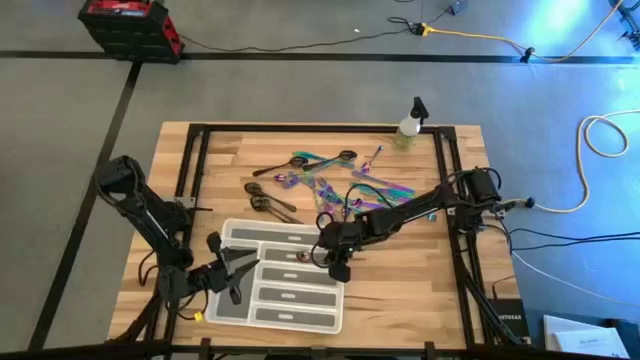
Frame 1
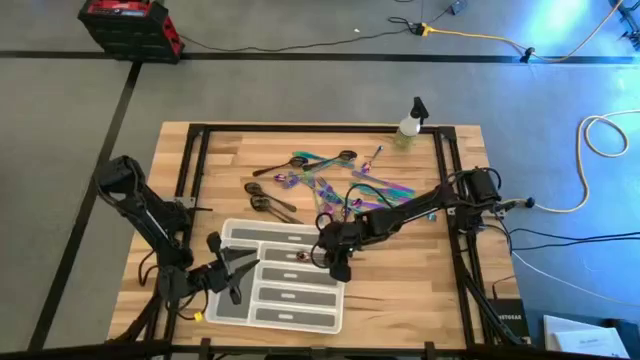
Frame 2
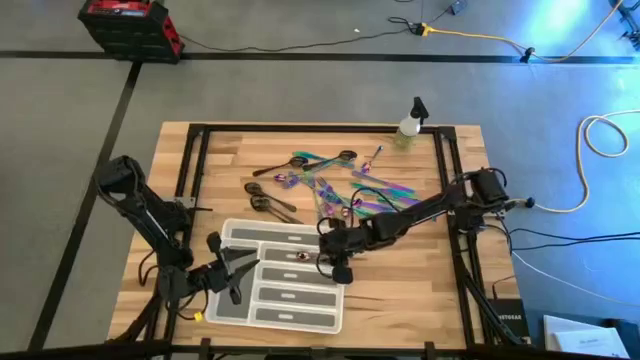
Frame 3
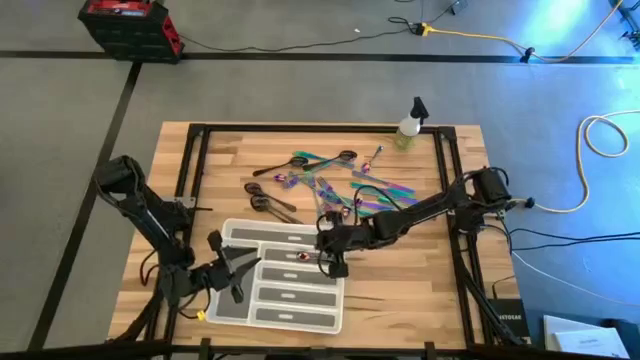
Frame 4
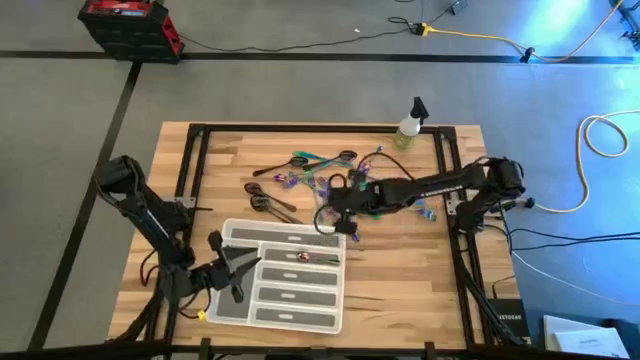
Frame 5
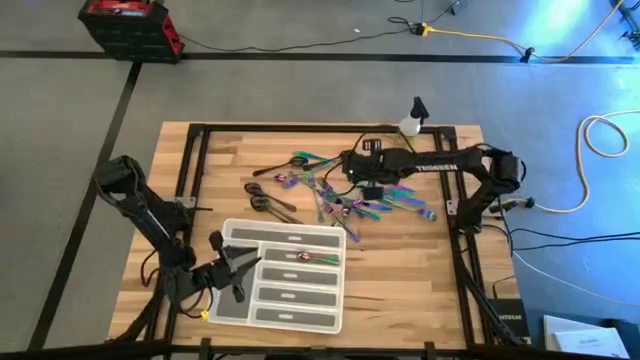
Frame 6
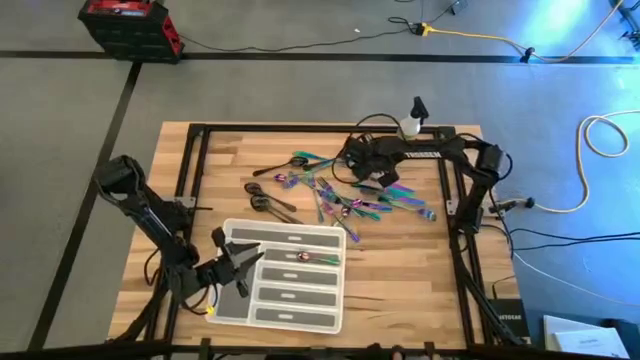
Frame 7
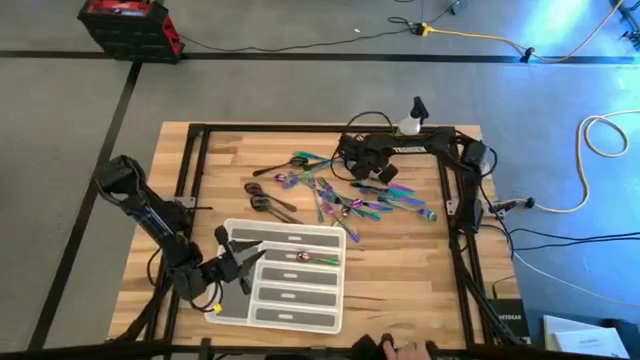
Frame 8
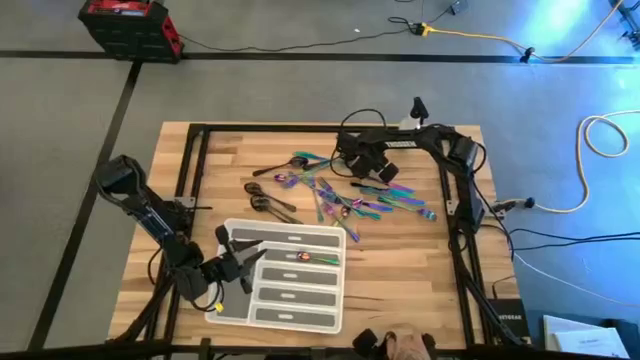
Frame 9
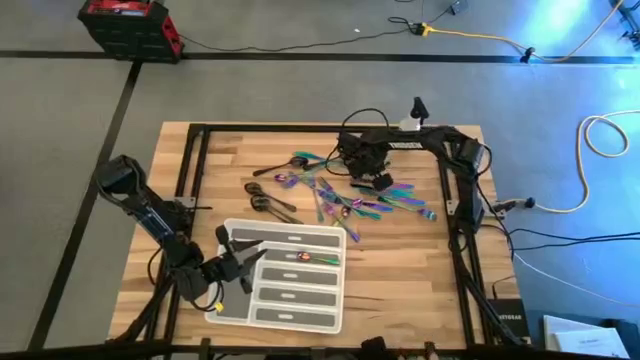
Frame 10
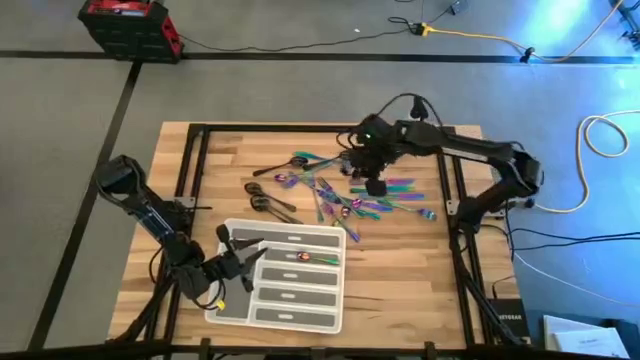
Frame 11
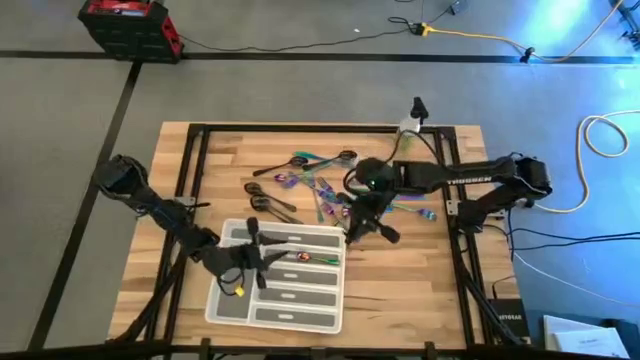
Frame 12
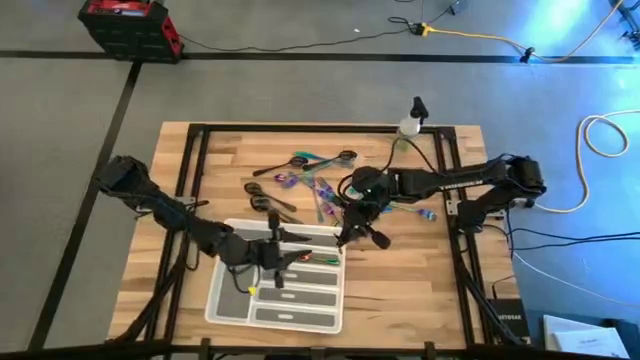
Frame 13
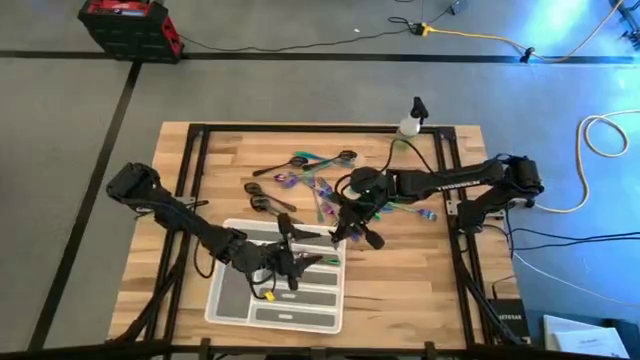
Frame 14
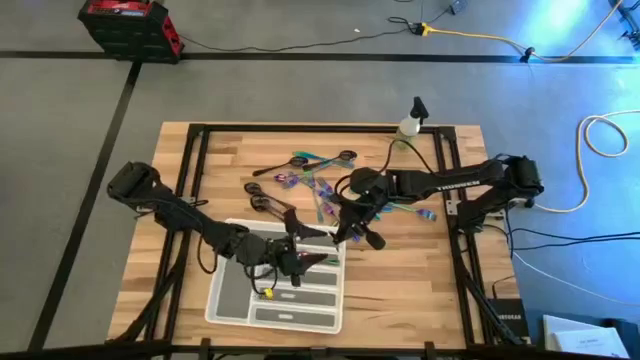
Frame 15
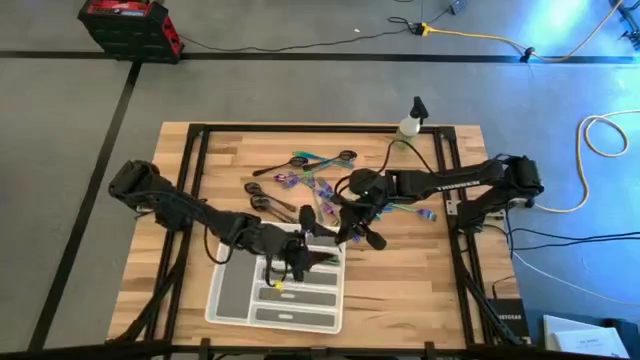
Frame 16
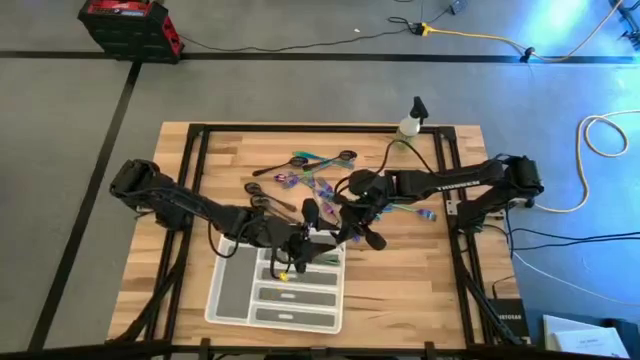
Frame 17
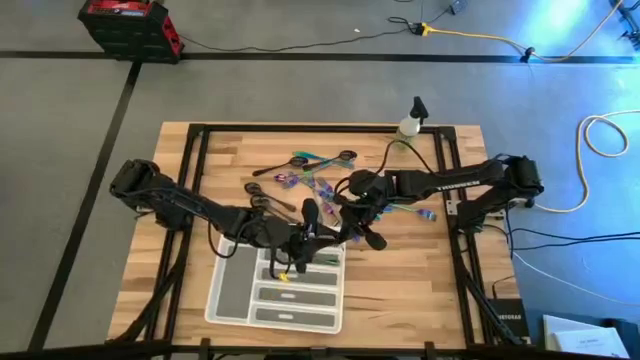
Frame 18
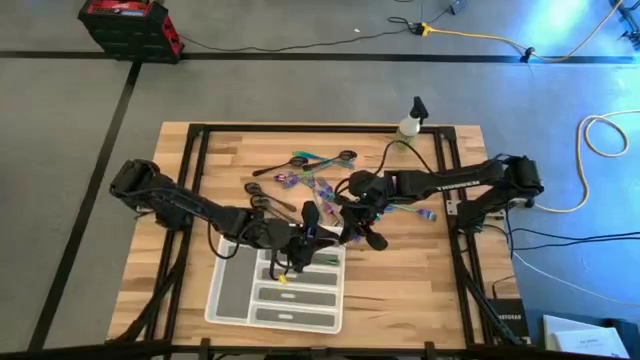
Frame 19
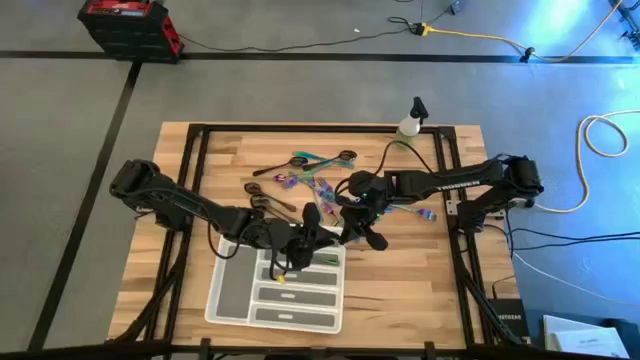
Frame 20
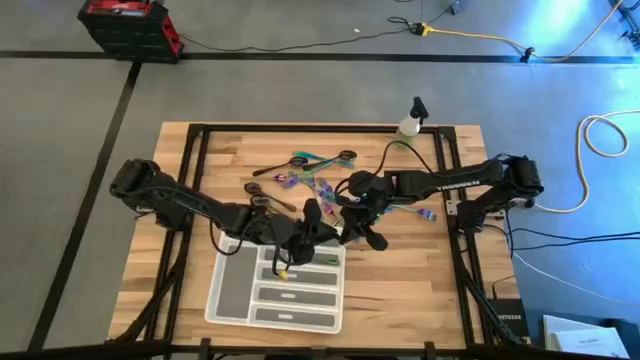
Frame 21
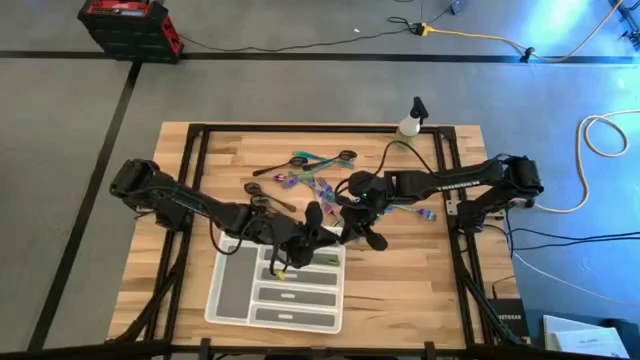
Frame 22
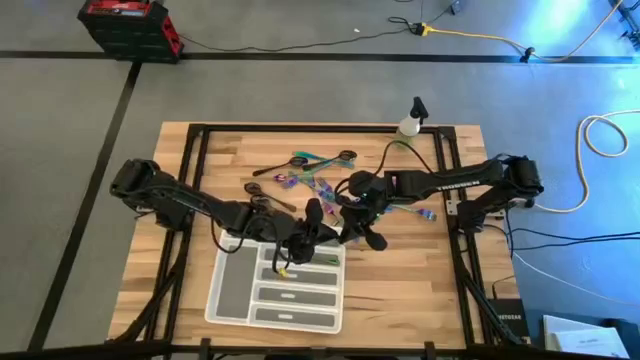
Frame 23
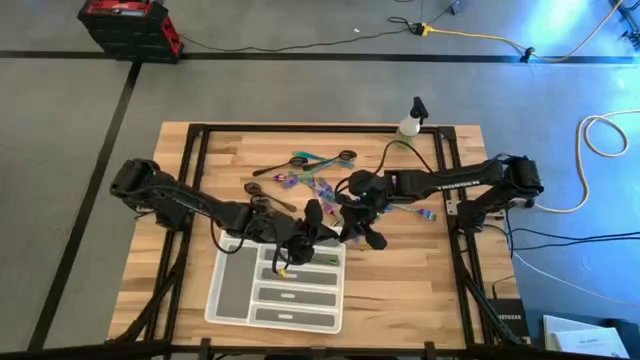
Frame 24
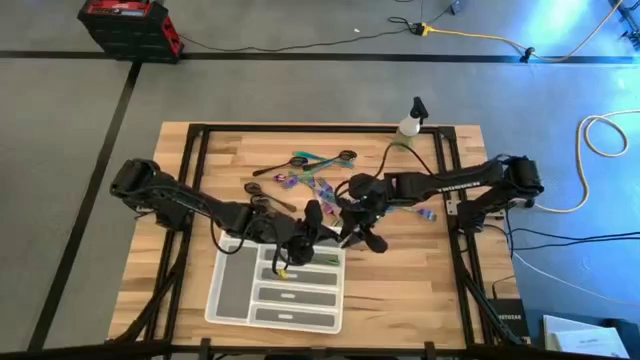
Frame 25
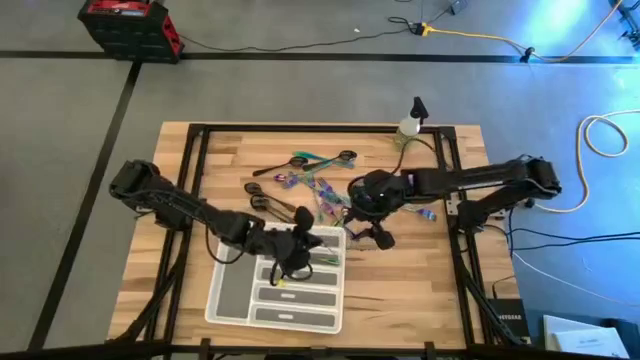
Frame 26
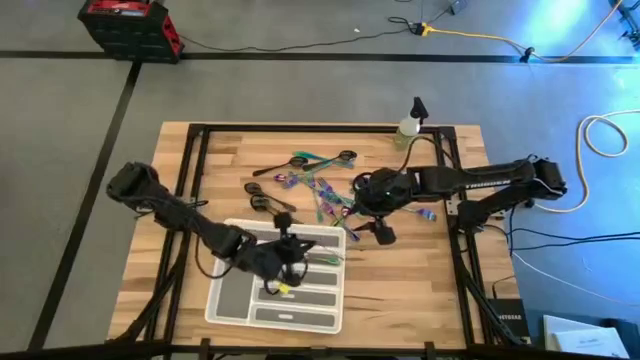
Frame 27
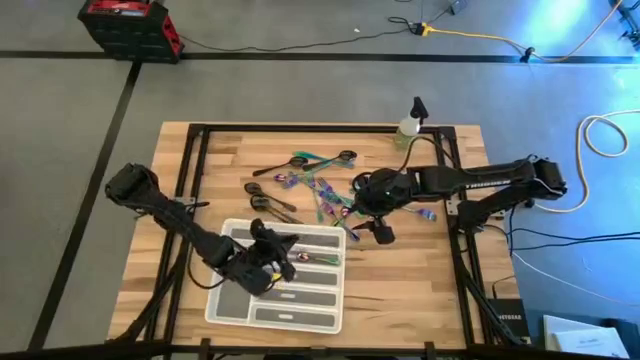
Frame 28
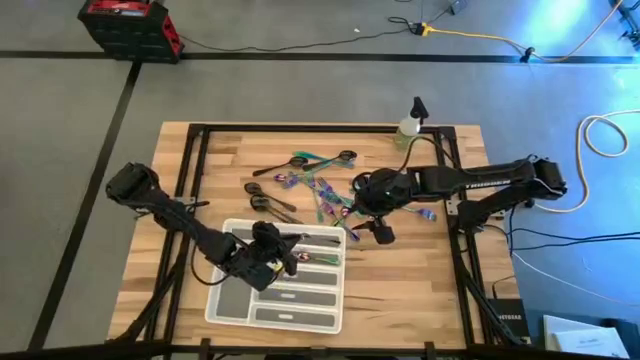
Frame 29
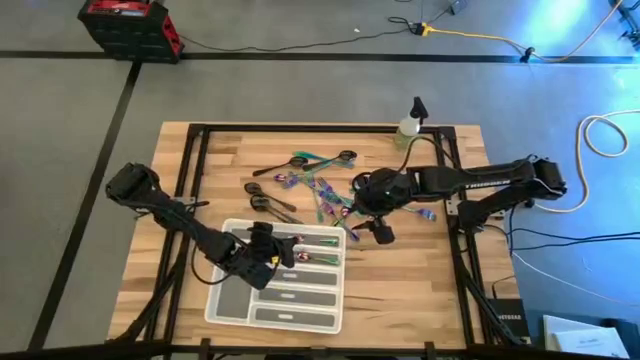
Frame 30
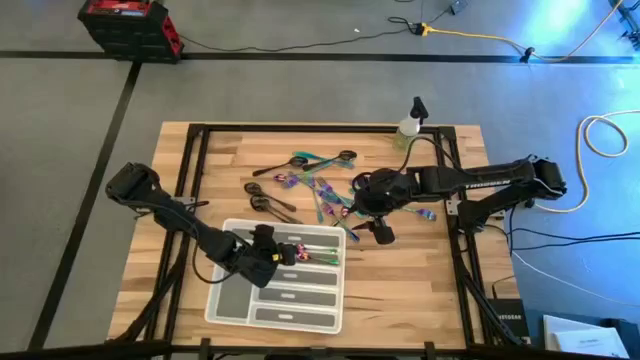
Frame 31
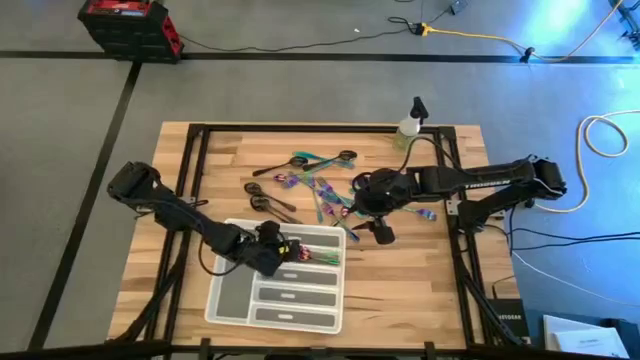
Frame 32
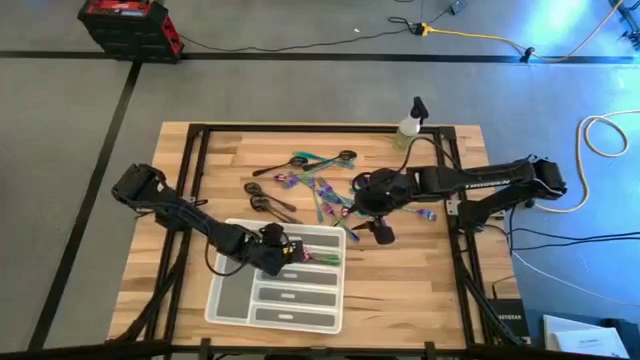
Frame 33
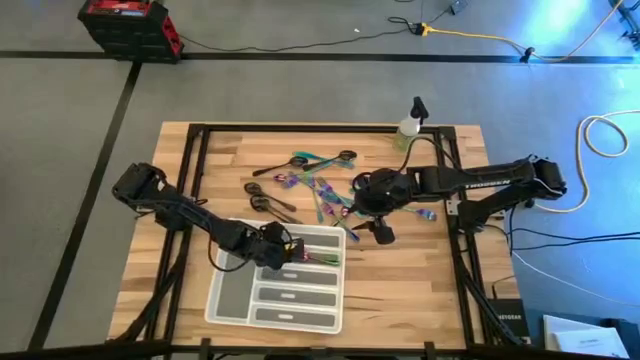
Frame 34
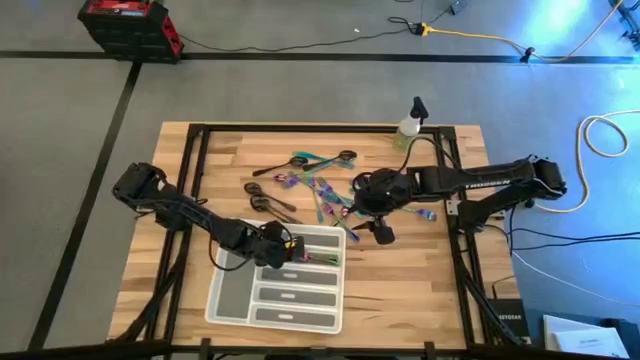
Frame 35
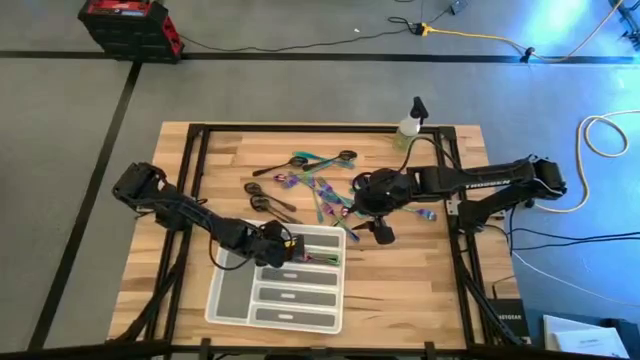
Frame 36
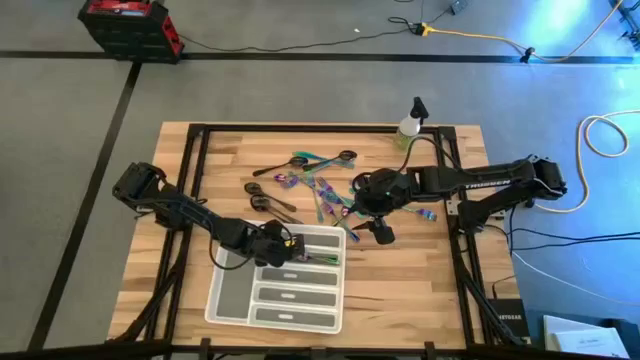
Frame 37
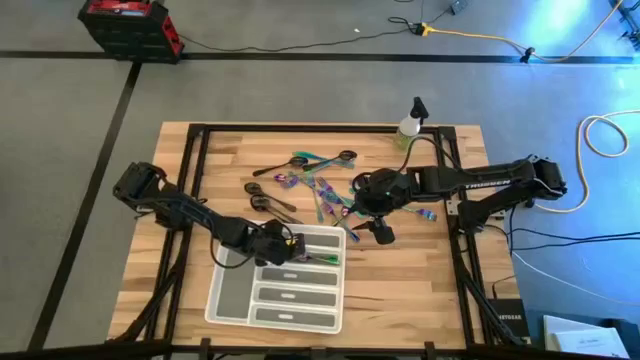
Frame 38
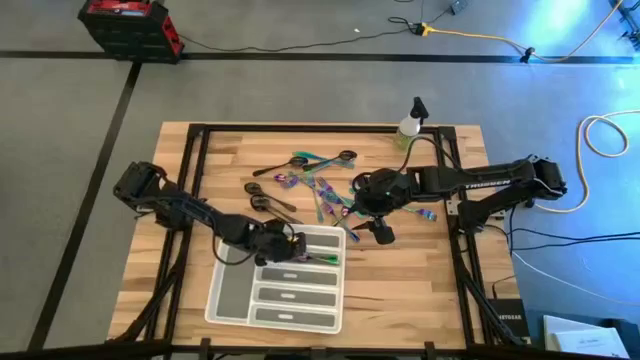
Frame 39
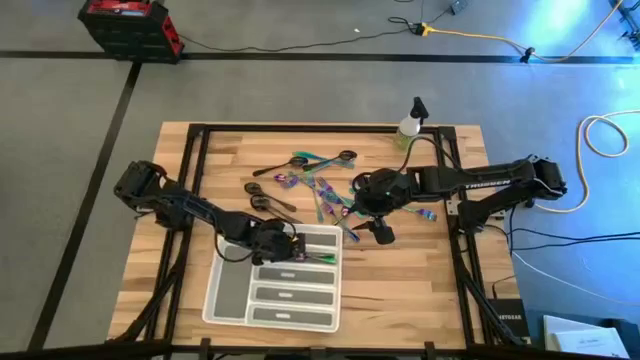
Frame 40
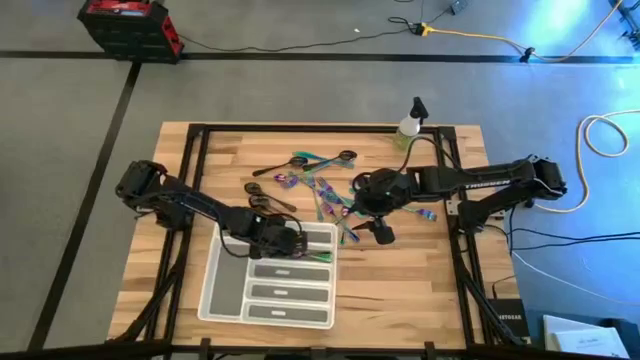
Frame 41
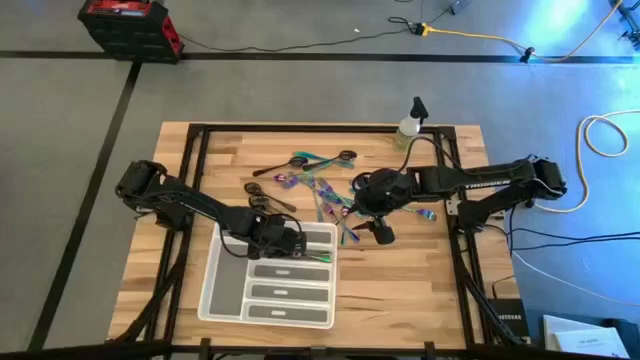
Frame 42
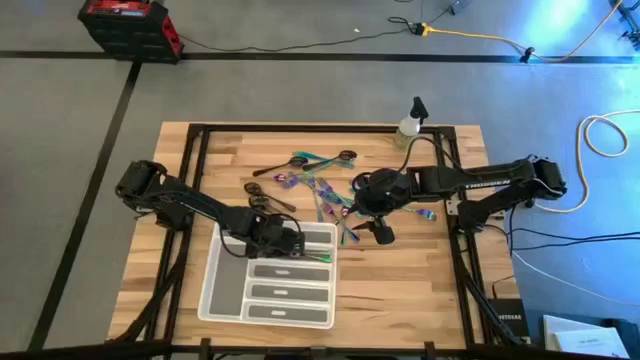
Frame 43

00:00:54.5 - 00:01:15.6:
Task: Sort silverware
Put the blue spoon into the white silverware tray
